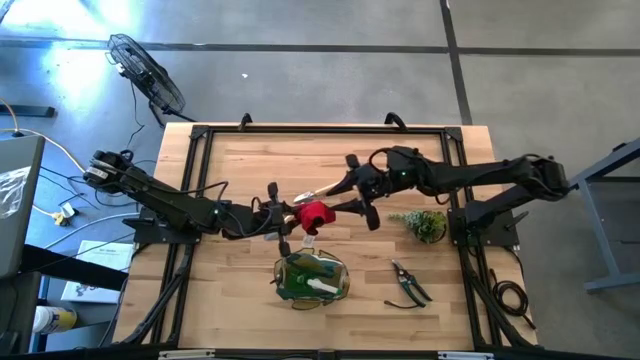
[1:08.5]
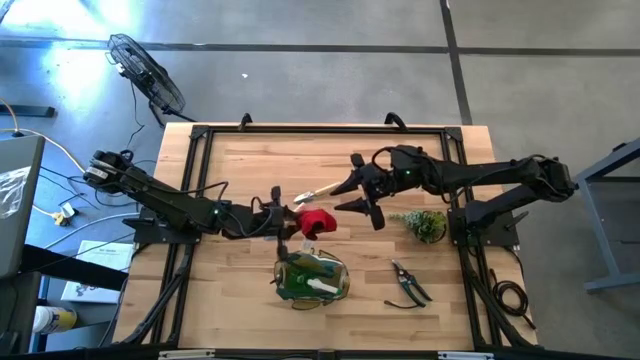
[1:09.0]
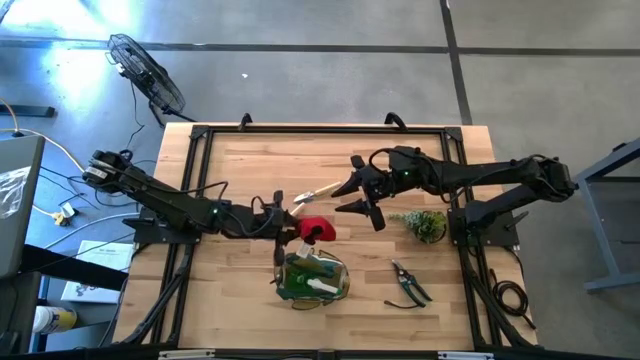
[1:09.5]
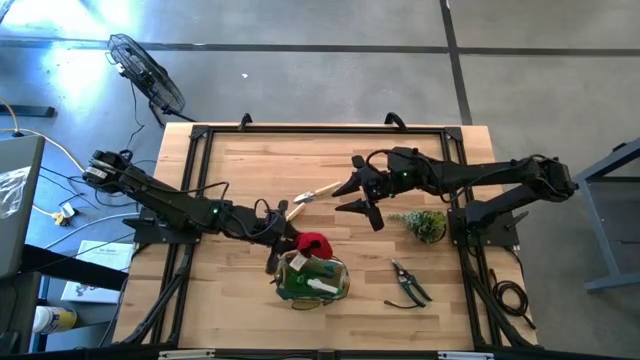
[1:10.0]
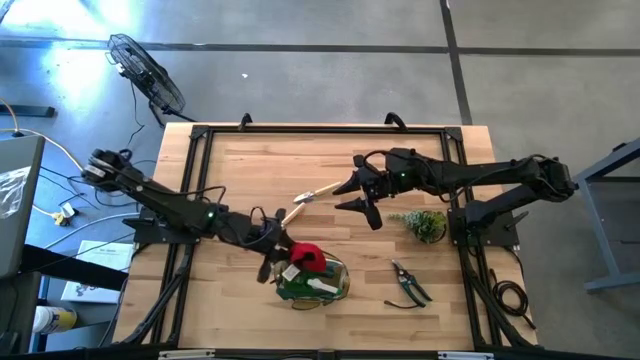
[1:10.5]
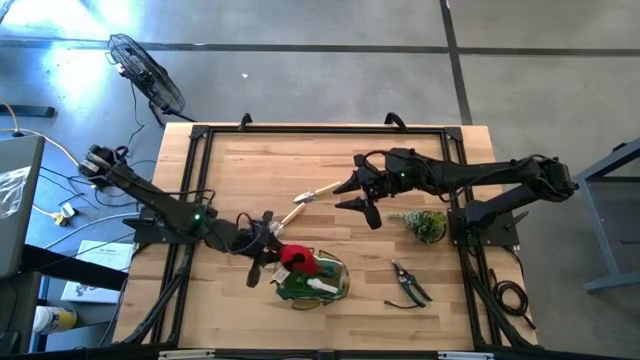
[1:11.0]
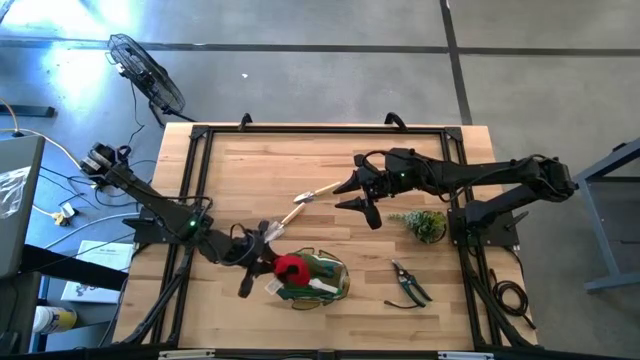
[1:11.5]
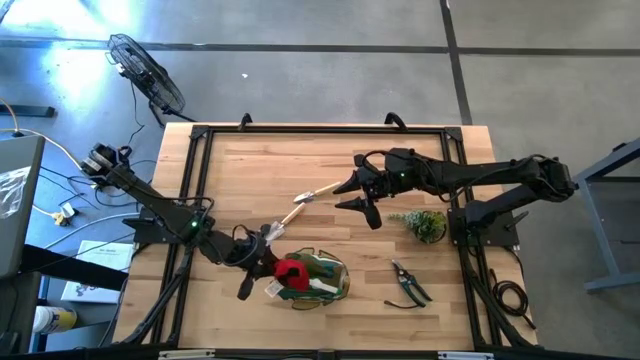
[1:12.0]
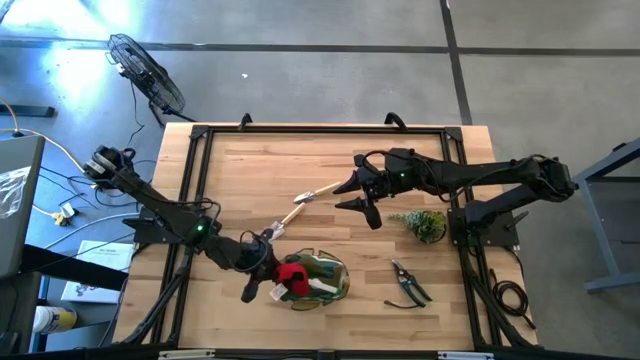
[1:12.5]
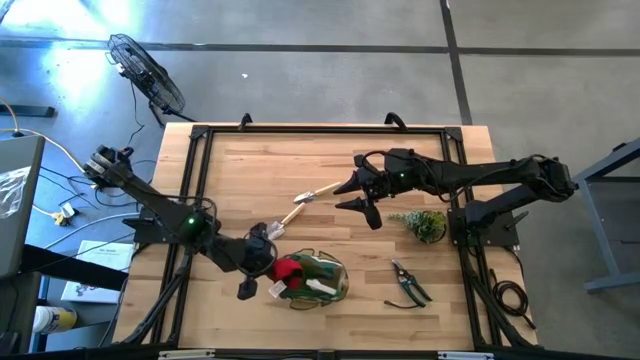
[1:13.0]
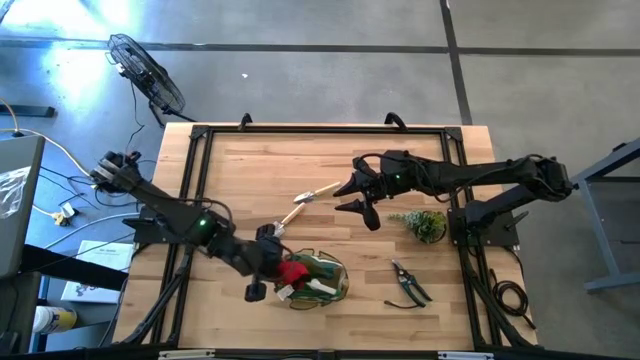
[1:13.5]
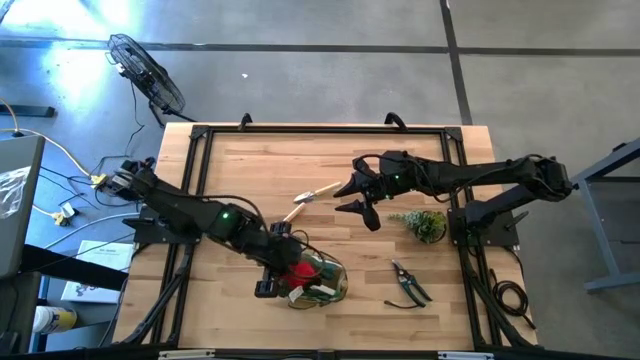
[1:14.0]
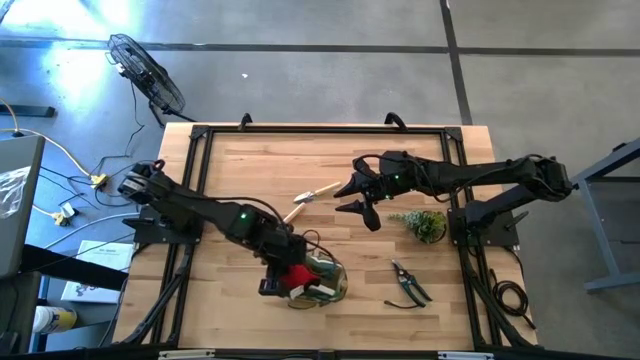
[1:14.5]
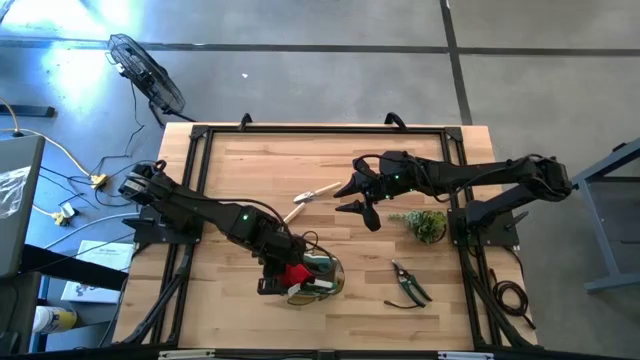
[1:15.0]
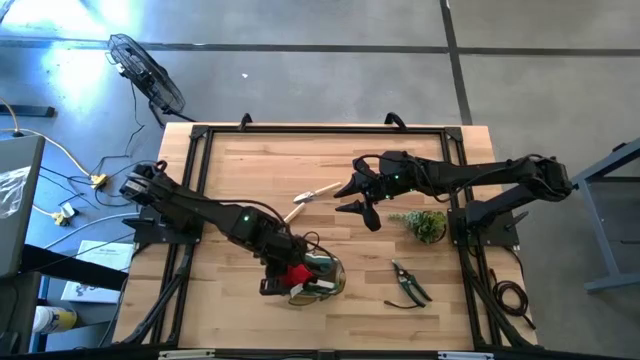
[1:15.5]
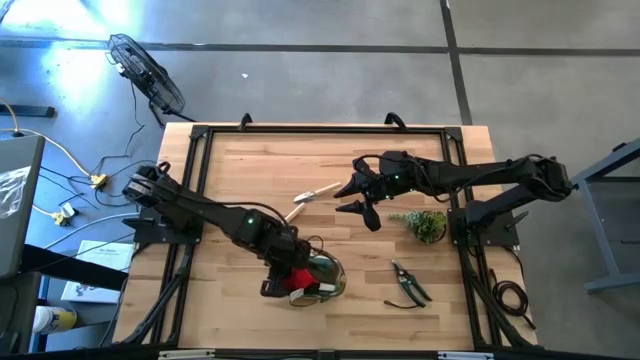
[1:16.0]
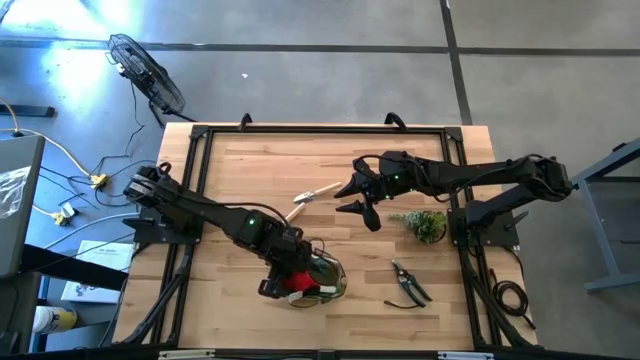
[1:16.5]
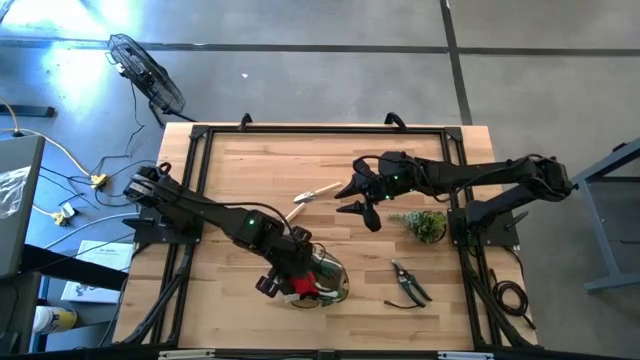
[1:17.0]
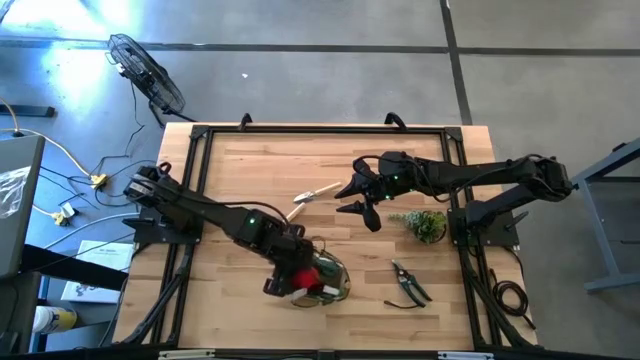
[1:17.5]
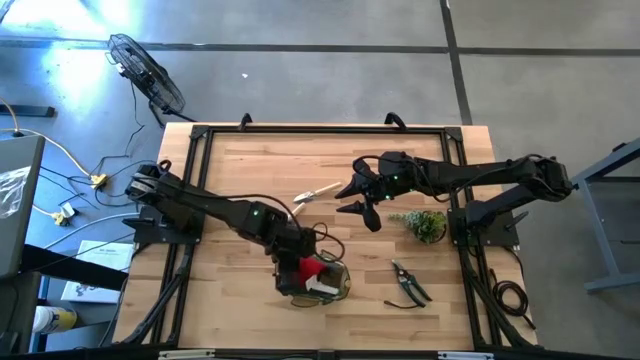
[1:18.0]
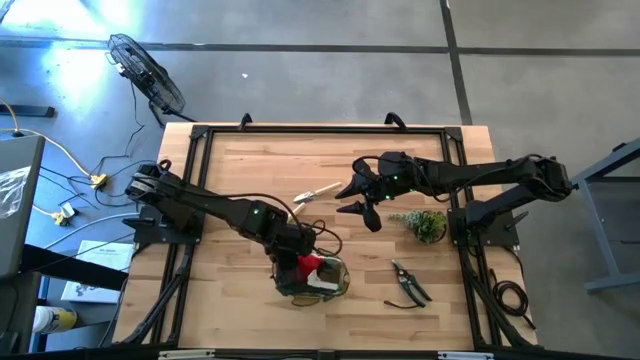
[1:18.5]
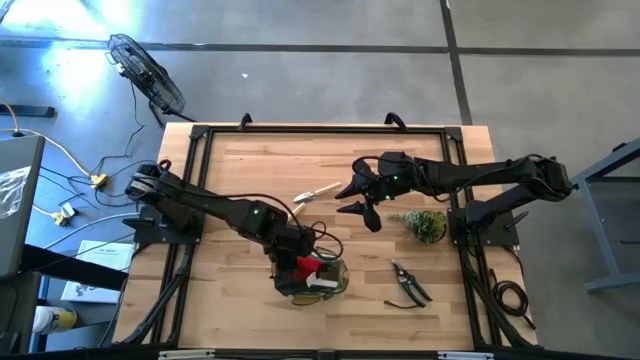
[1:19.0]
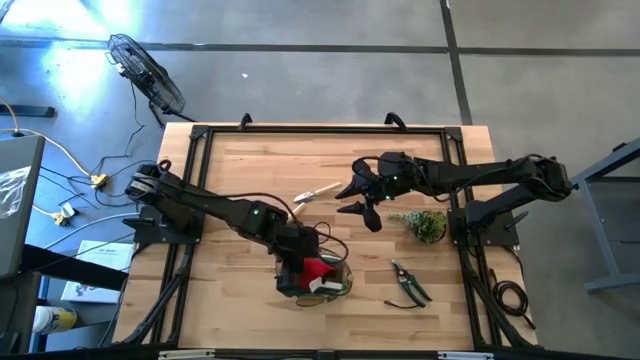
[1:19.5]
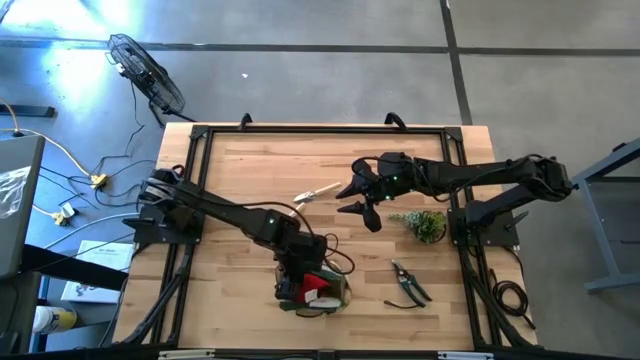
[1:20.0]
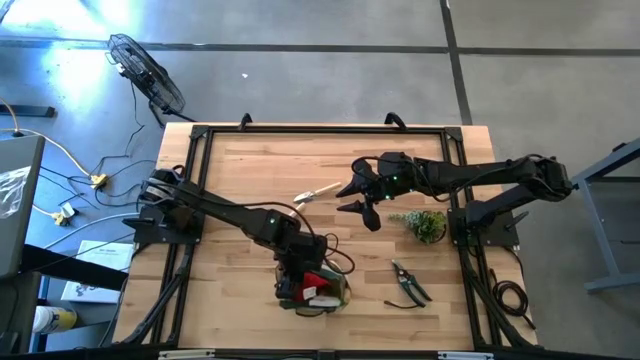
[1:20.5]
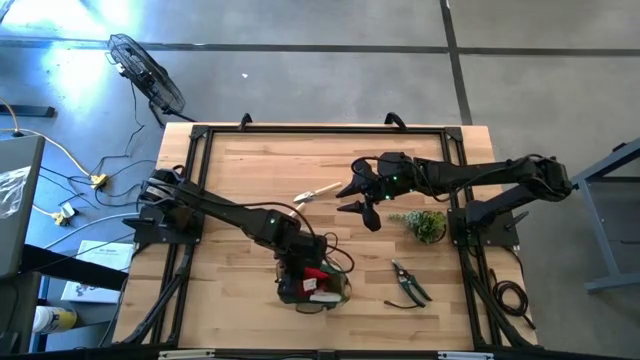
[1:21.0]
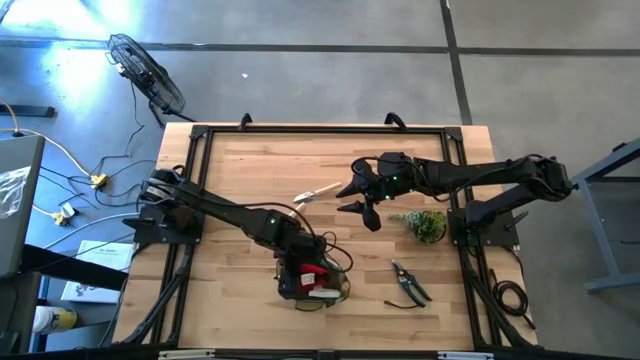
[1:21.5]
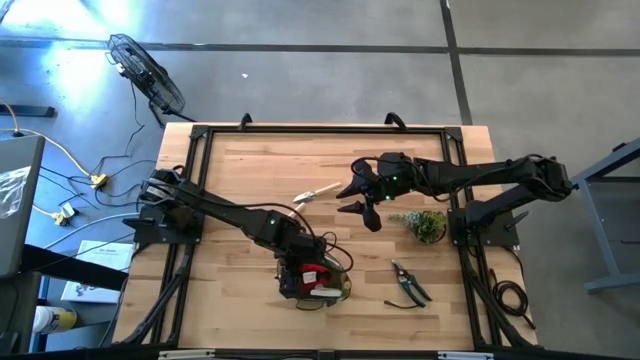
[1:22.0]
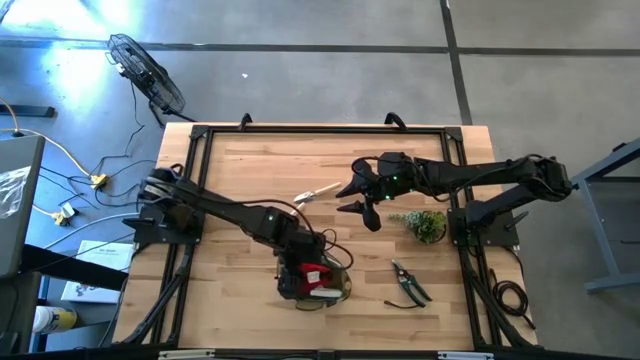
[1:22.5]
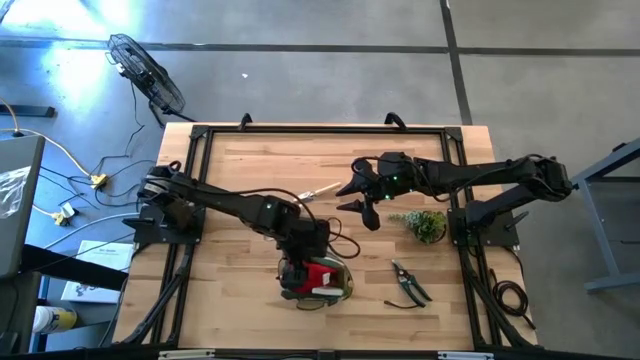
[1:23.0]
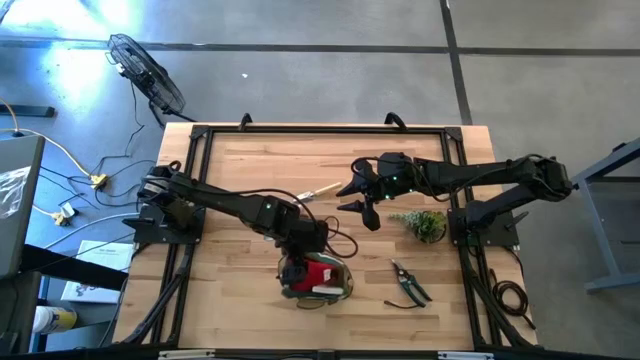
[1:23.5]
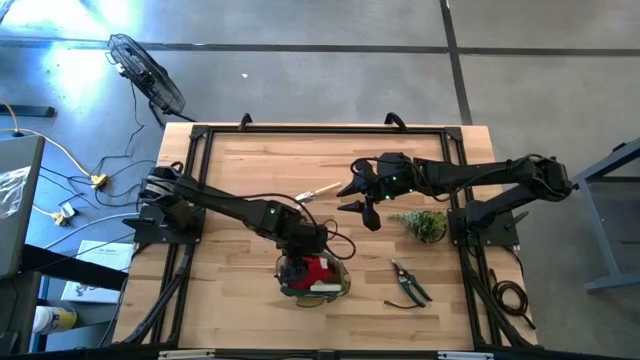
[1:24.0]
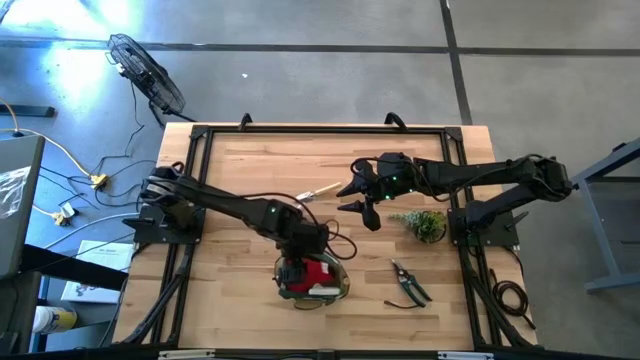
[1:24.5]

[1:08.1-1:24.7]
Task: Pick & Place Garden tools in Gardening bag
Put the red gloves into the gardening bag

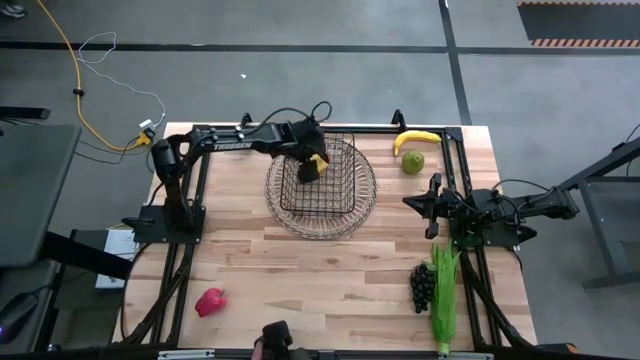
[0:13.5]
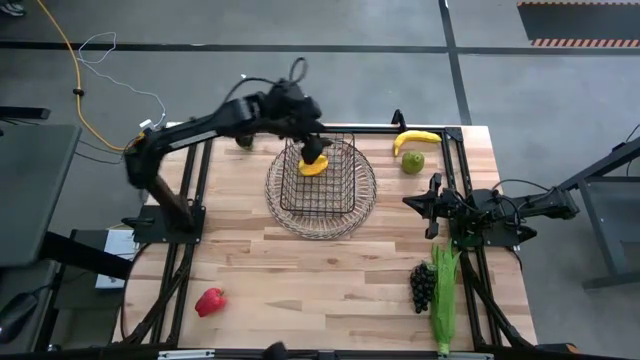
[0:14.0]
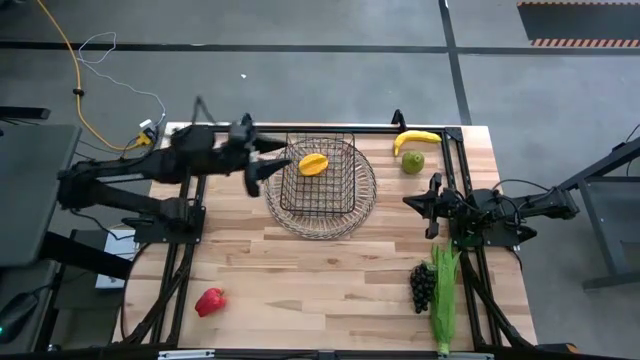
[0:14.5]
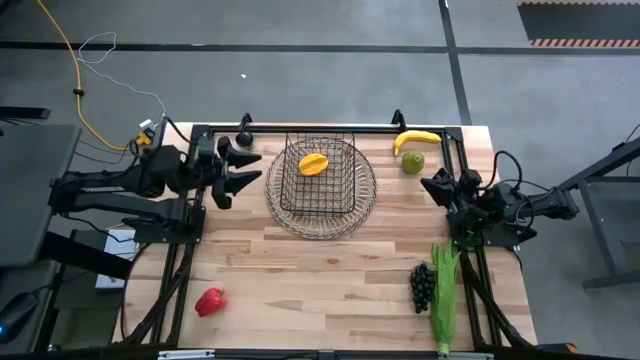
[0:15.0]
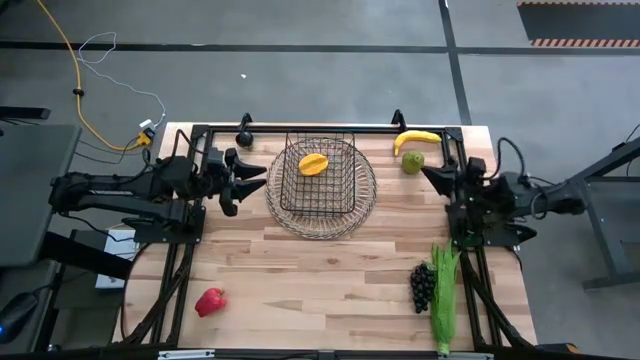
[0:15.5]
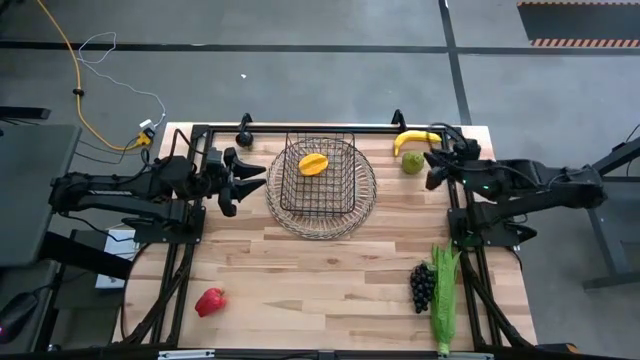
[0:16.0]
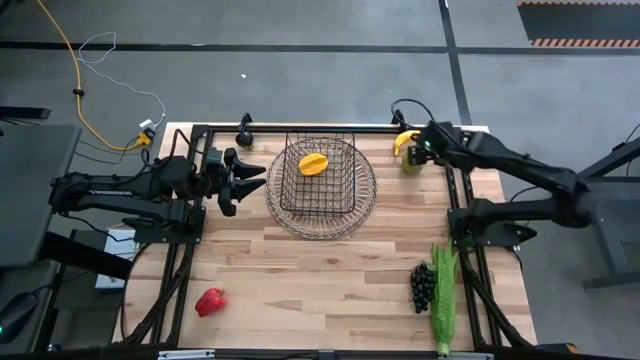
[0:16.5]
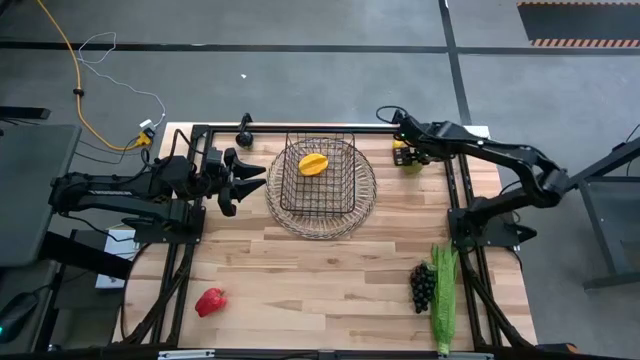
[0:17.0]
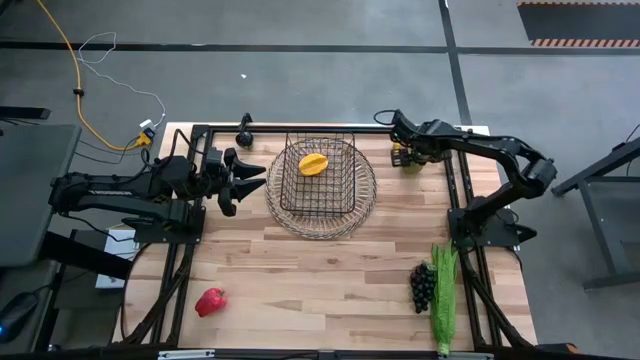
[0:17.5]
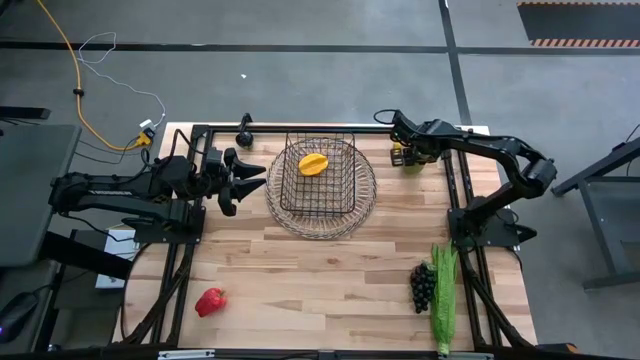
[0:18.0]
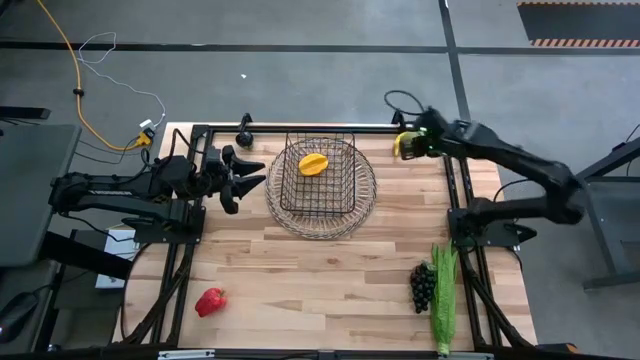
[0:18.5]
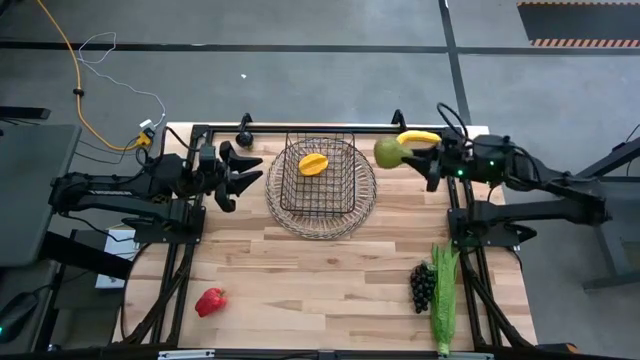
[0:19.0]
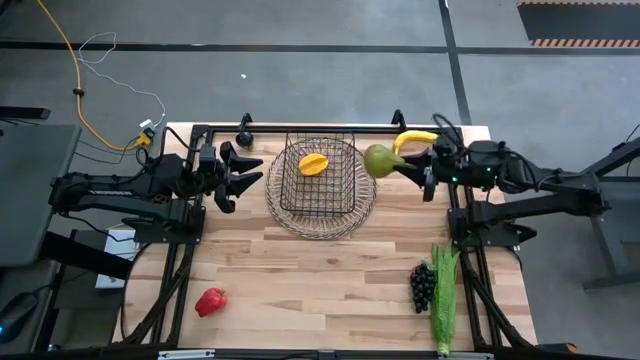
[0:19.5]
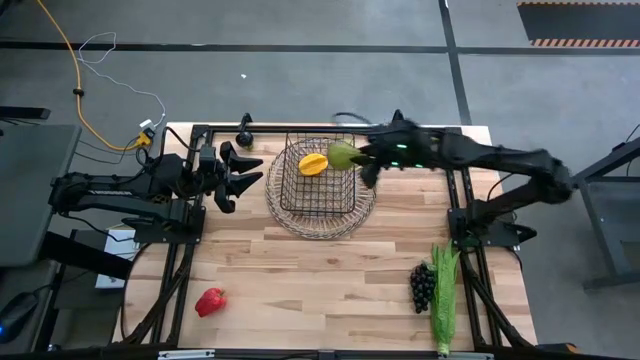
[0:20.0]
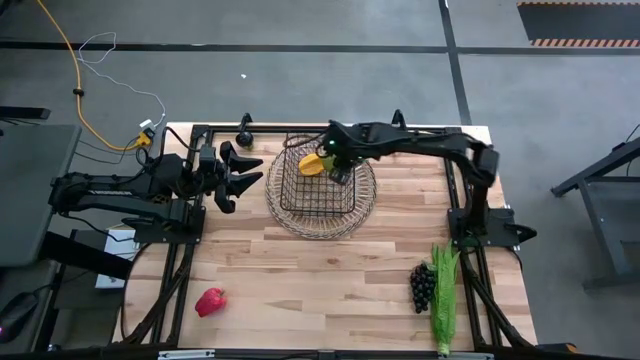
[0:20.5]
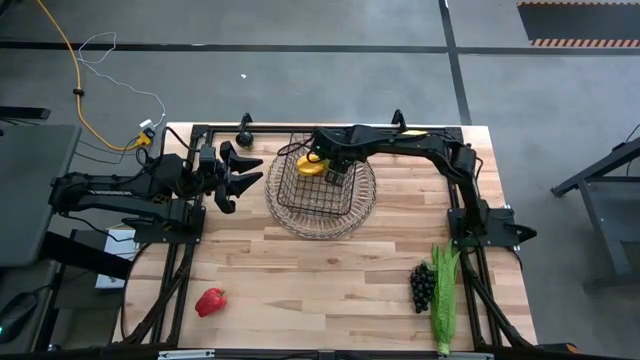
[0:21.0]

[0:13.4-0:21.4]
Task: Build produce basket
Put the pear into the wire basket
